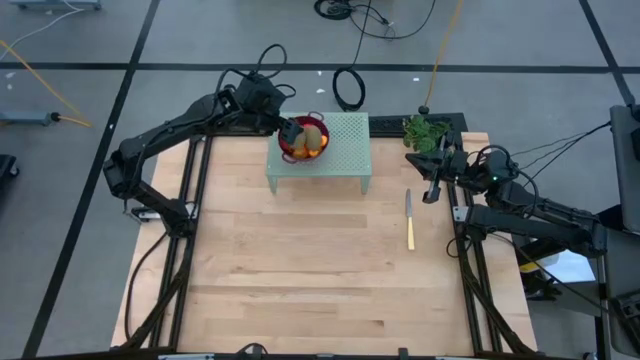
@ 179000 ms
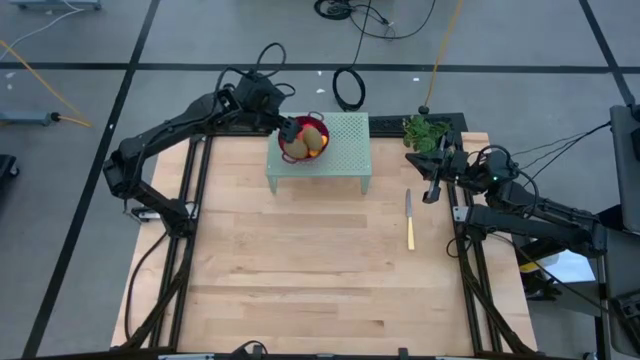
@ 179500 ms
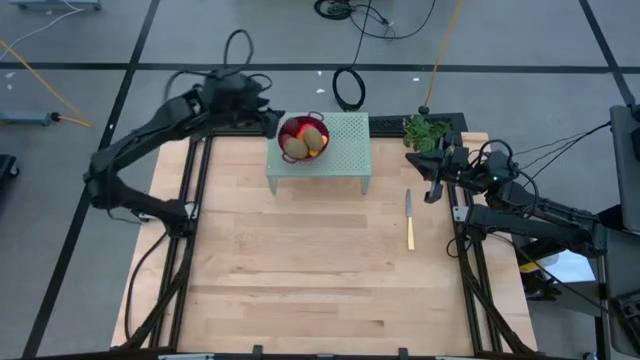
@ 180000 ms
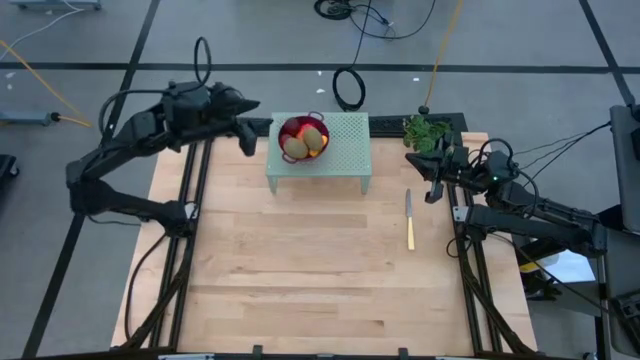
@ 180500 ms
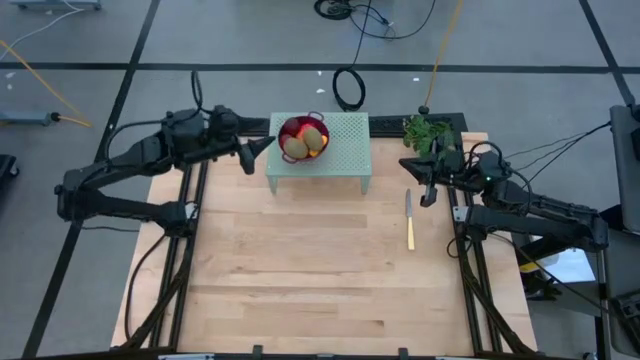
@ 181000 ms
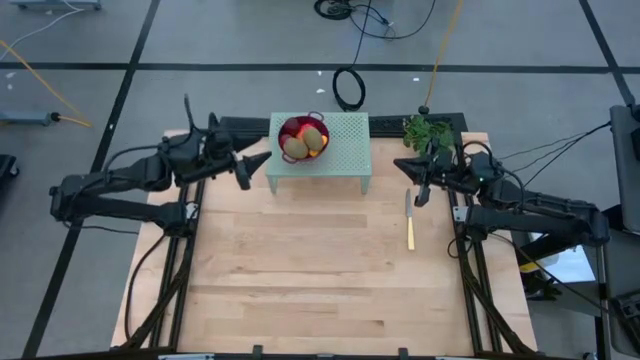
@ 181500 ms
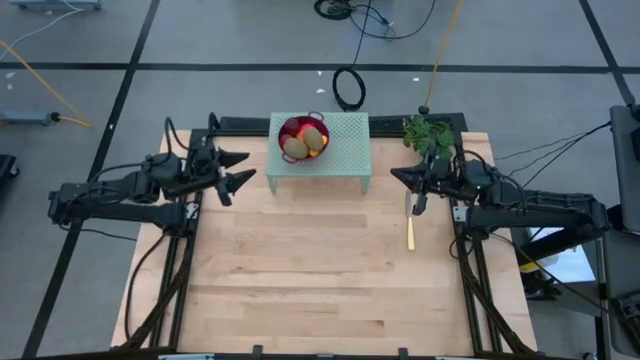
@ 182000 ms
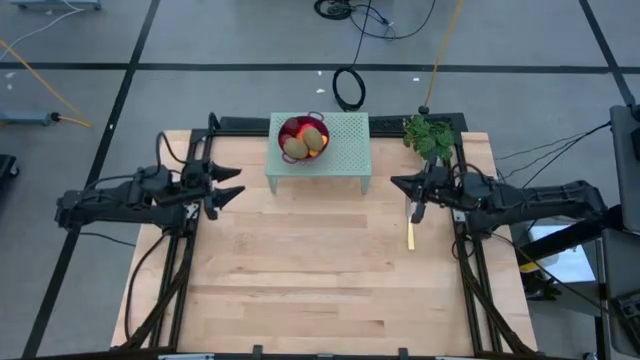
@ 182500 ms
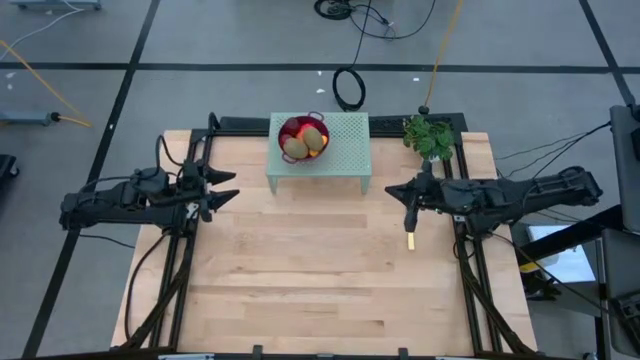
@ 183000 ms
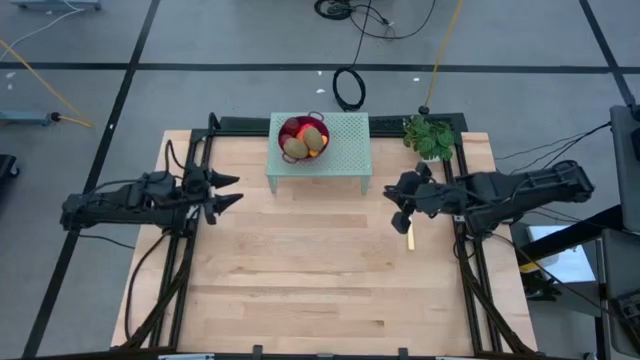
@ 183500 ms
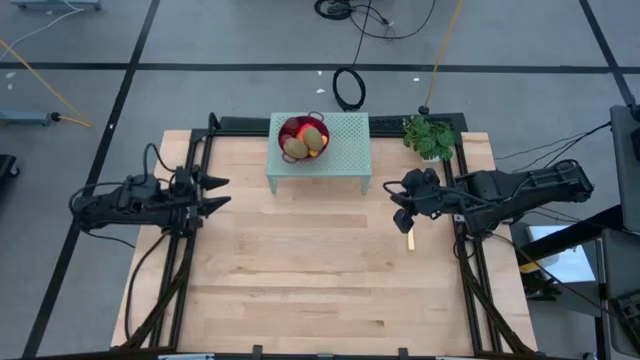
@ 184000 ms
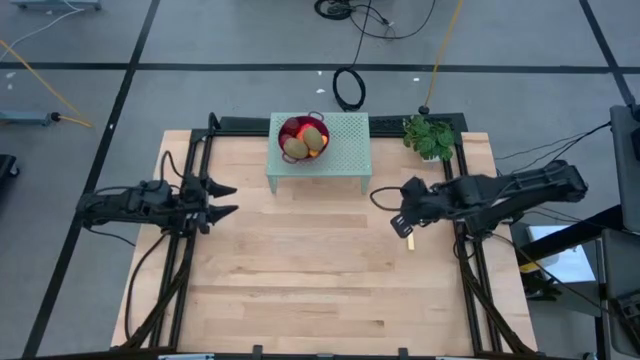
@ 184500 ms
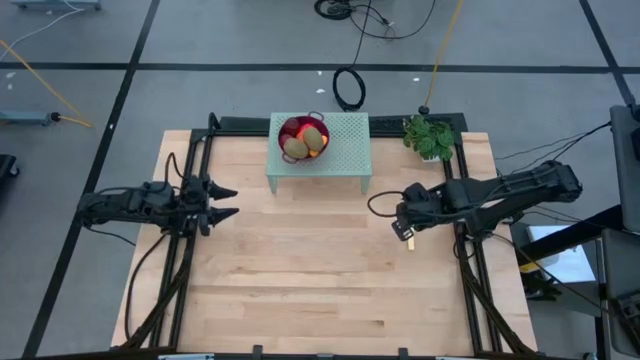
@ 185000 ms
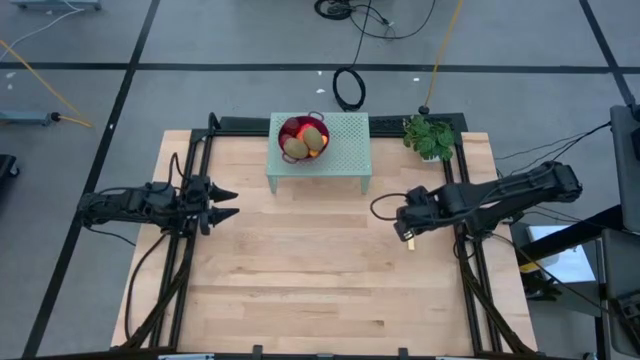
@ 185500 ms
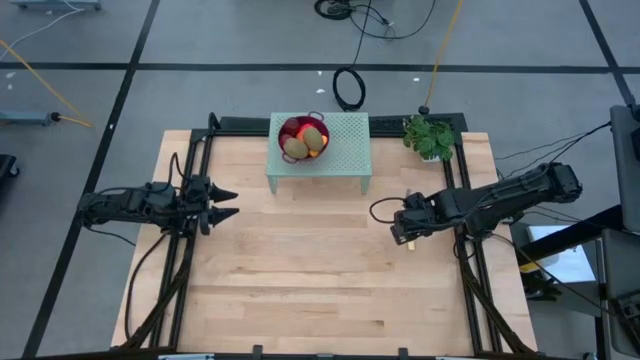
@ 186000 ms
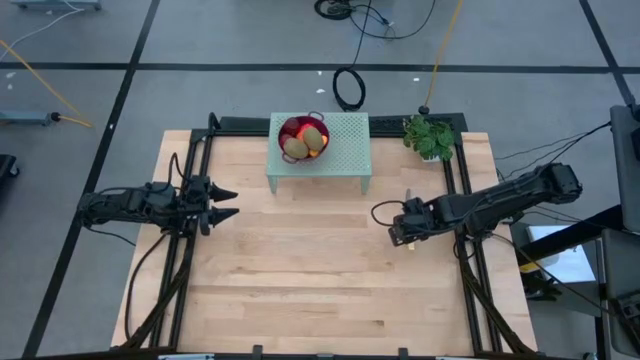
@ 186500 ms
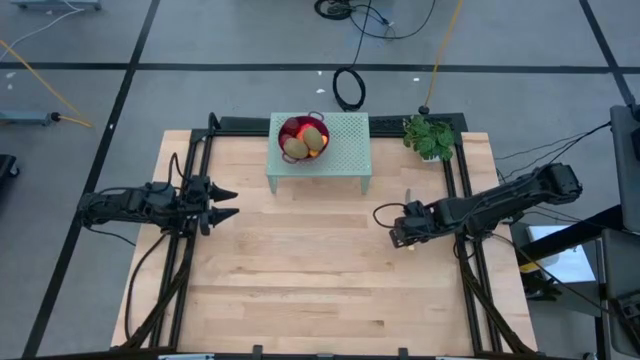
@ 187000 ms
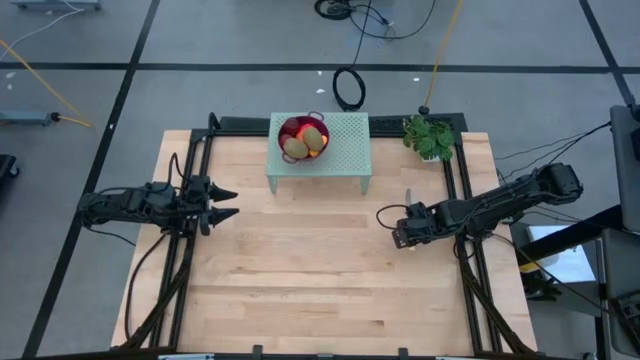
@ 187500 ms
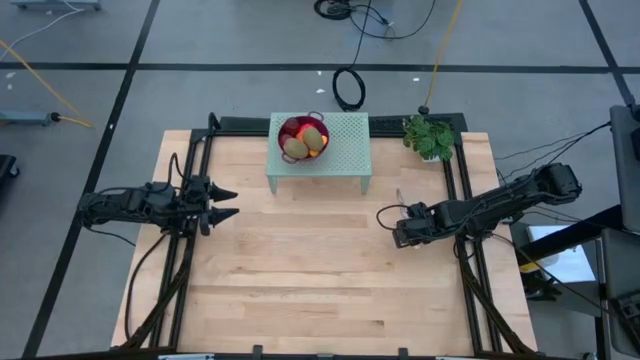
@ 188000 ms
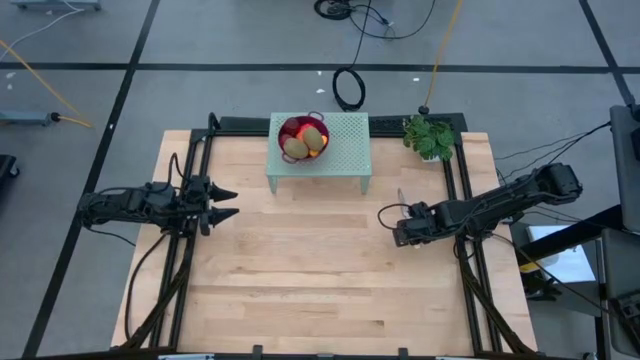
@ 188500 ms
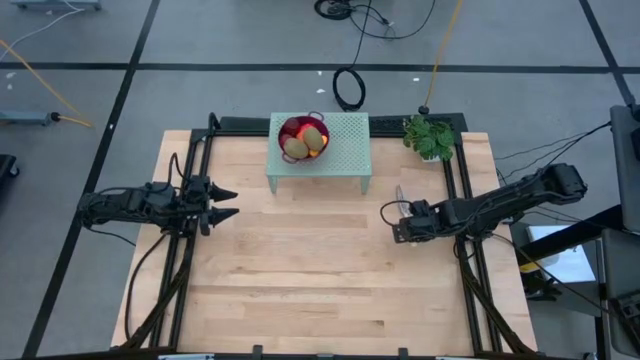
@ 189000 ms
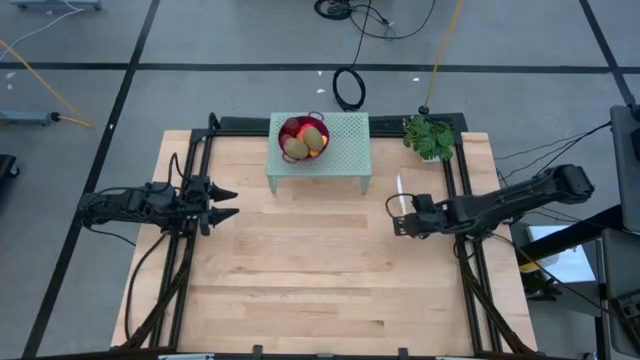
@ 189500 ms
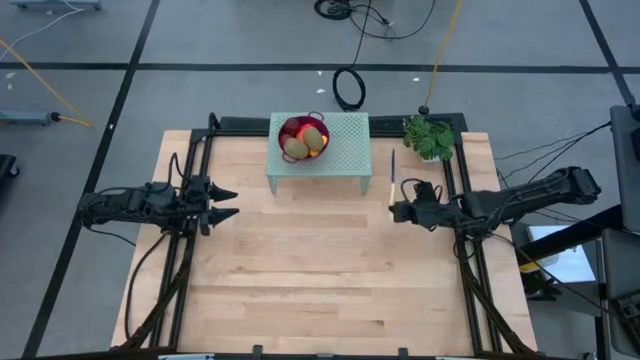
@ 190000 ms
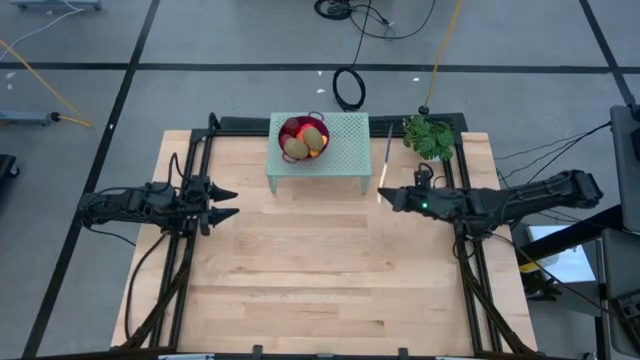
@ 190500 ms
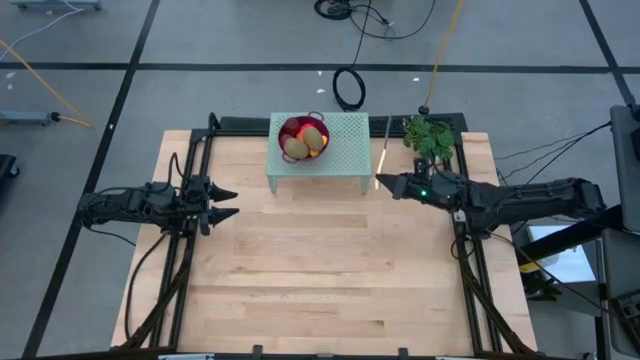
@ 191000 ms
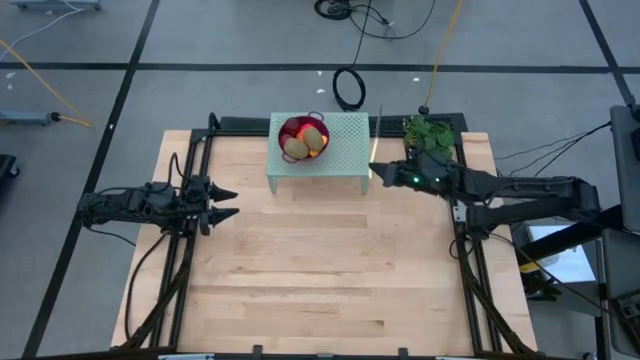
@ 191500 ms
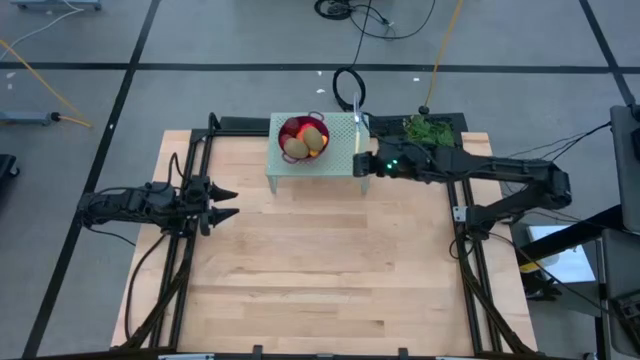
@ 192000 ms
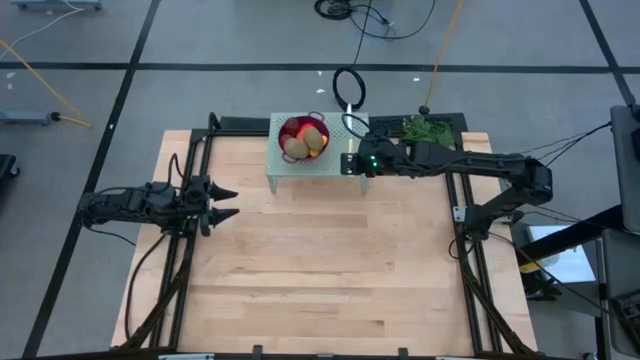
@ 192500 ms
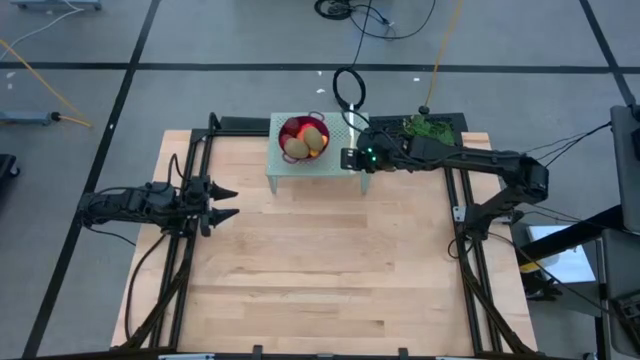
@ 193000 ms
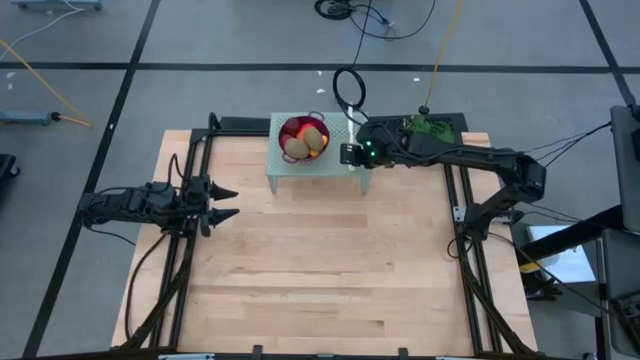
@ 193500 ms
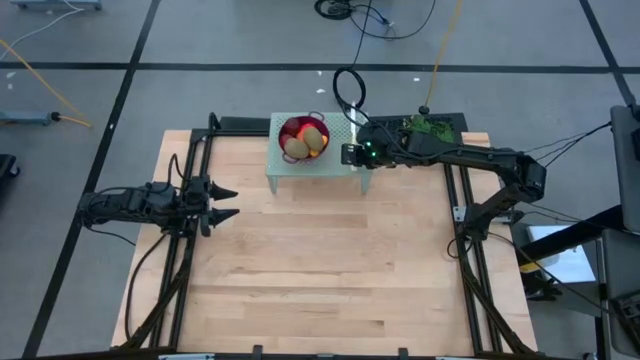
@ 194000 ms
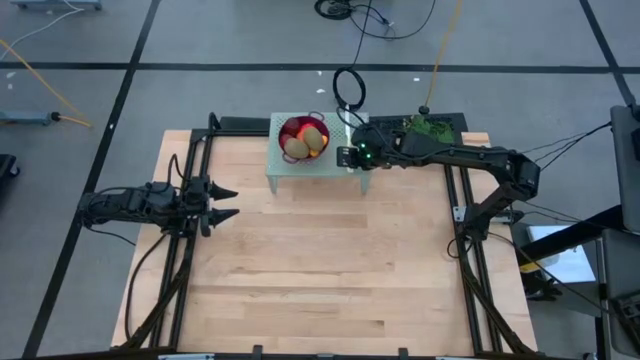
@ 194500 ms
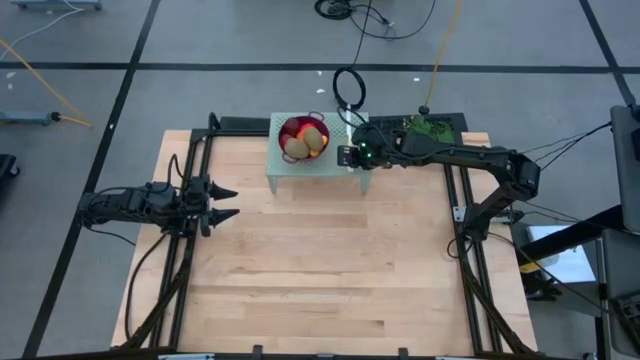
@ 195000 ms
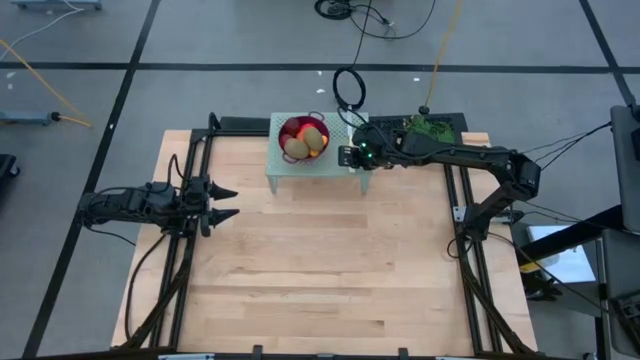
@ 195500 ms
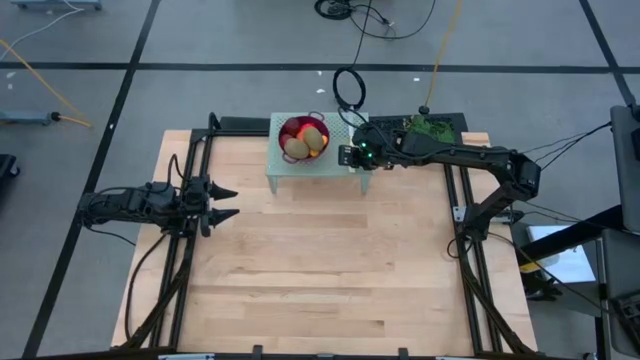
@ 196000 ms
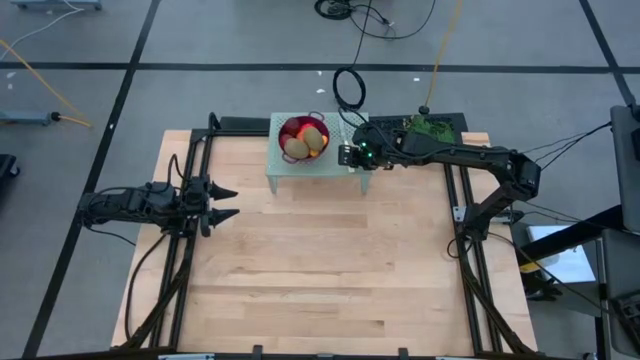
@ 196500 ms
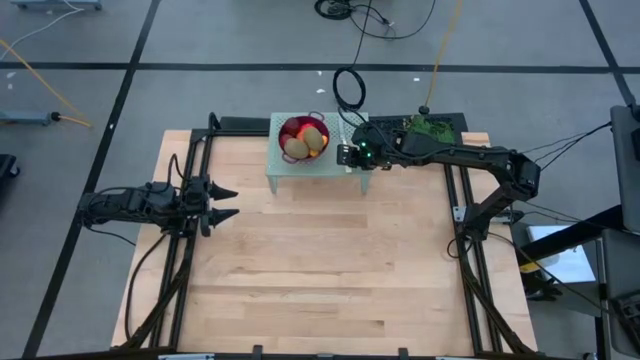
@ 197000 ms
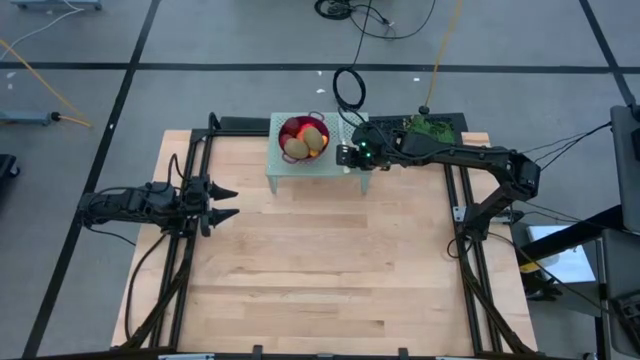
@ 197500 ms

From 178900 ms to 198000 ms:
Task: Pick & Place Fruit
Put the yellow table knife on the shelf

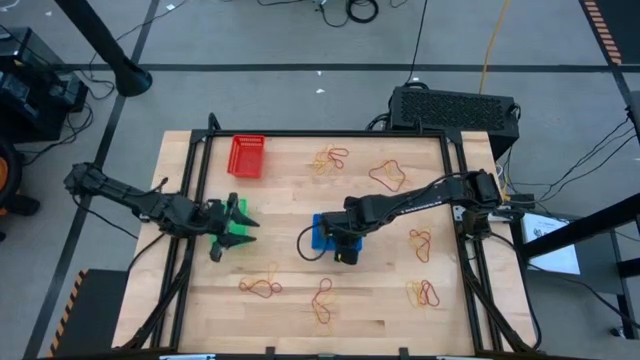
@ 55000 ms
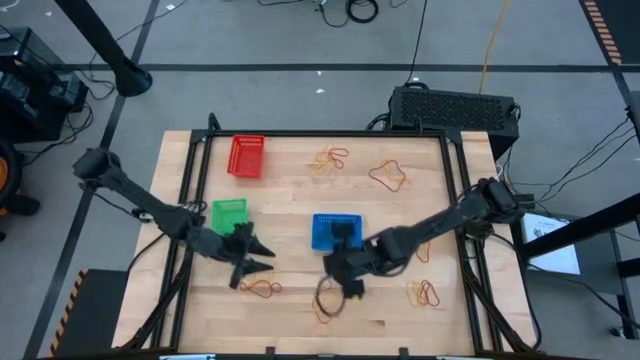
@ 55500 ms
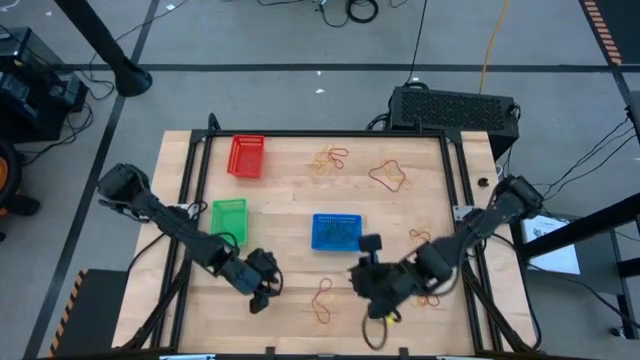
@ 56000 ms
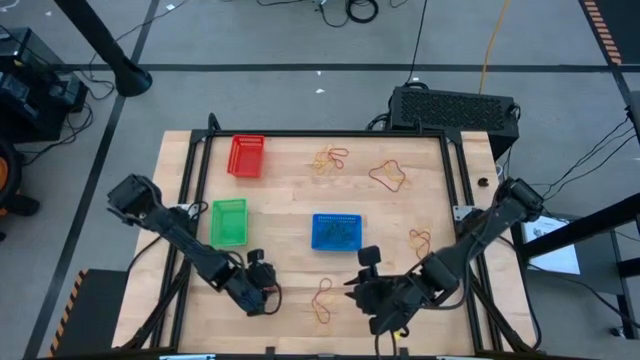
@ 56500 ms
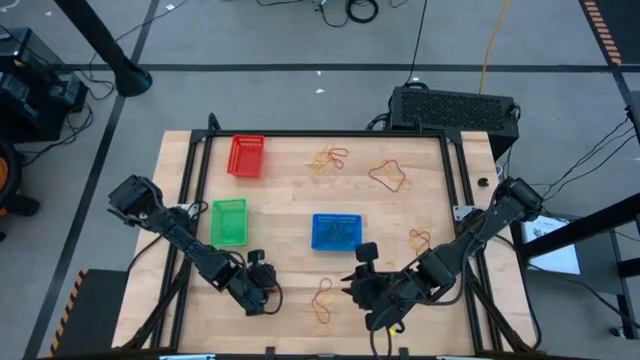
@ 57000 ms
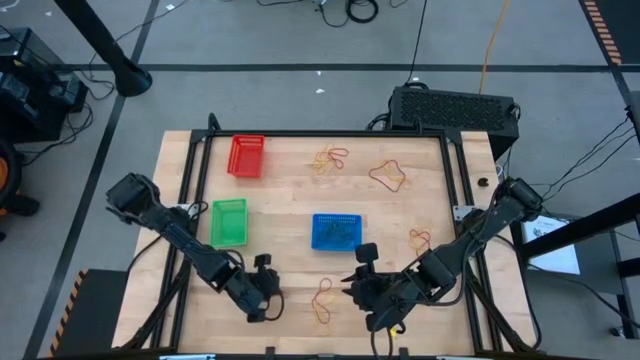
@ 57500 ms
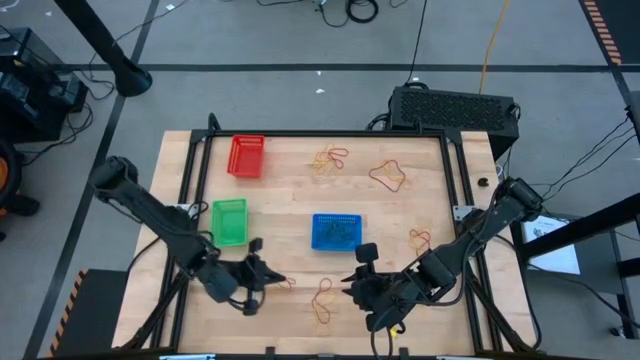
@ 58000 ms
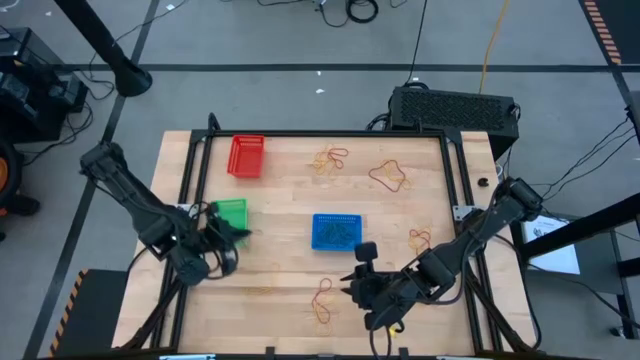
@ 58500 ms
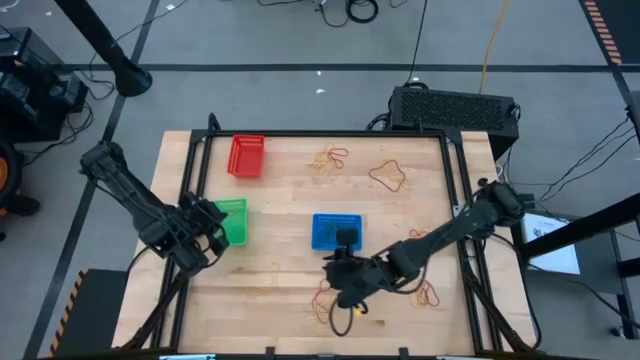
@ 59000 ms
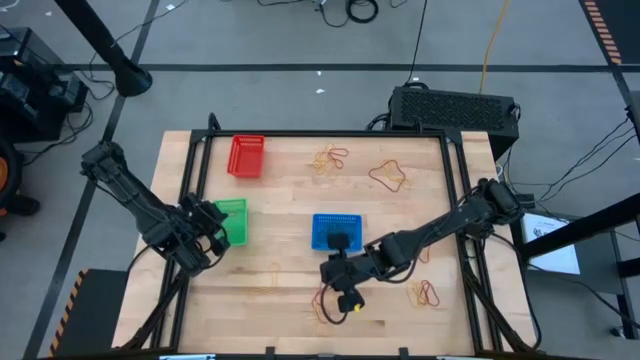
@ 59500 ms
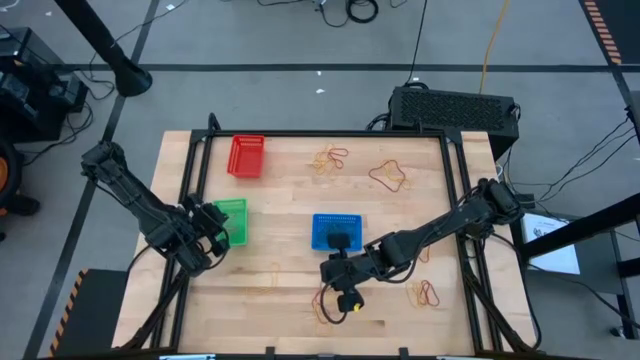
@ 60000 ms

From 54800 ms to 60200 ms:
Task: Sort rubber bands into baskets
Put the red rubber band into the green bin
